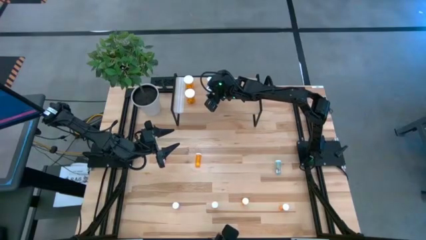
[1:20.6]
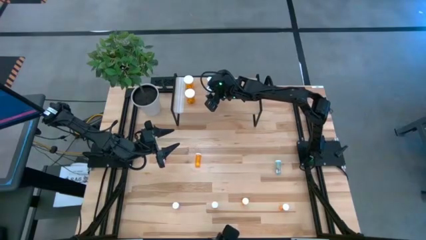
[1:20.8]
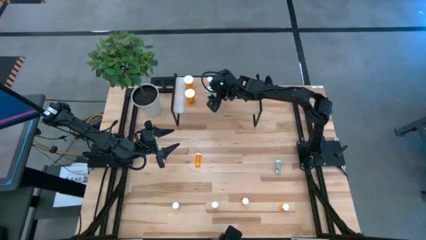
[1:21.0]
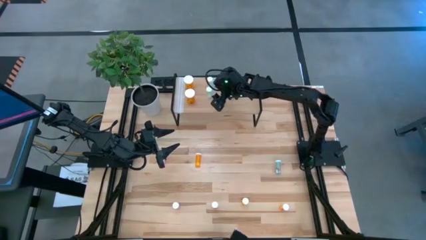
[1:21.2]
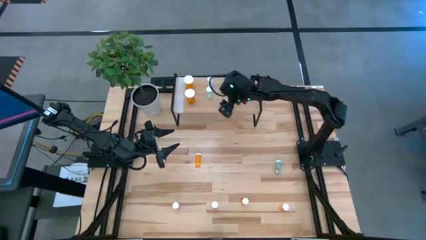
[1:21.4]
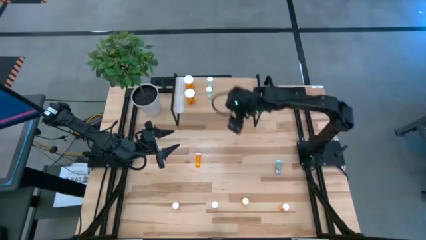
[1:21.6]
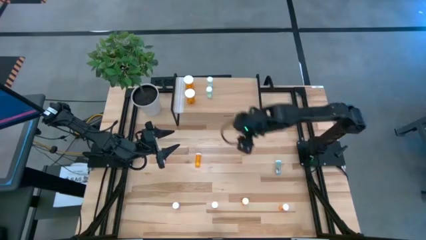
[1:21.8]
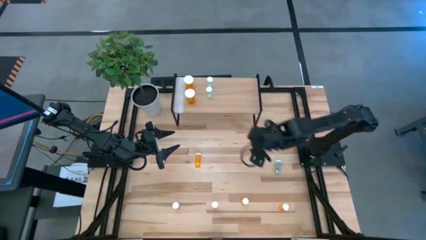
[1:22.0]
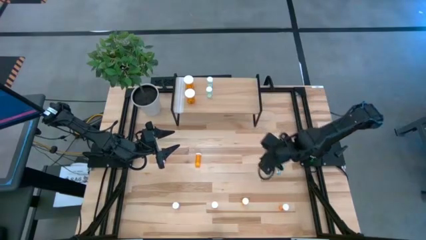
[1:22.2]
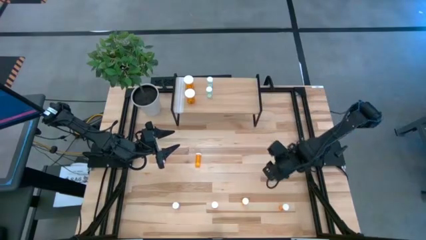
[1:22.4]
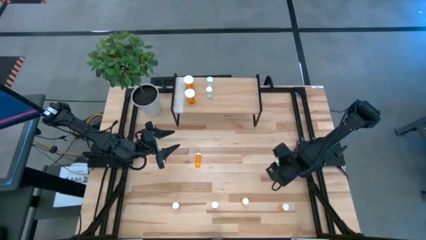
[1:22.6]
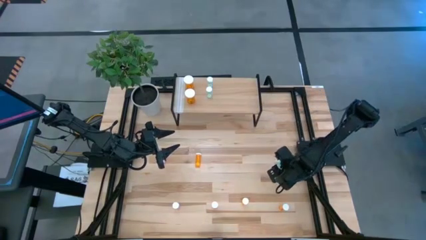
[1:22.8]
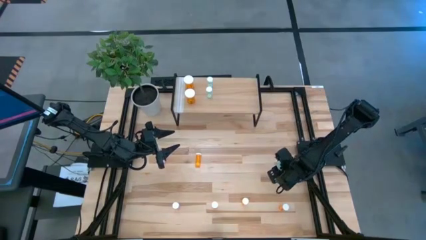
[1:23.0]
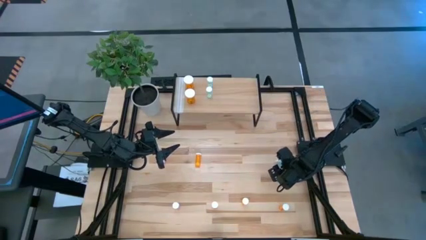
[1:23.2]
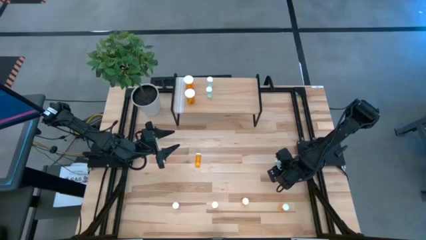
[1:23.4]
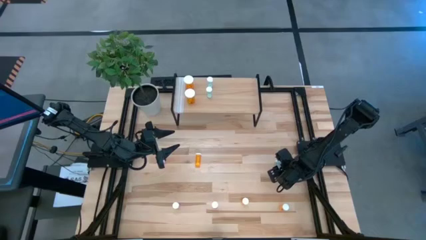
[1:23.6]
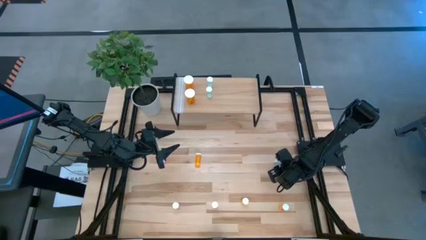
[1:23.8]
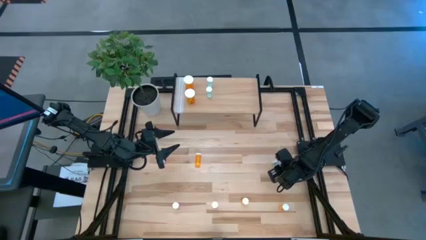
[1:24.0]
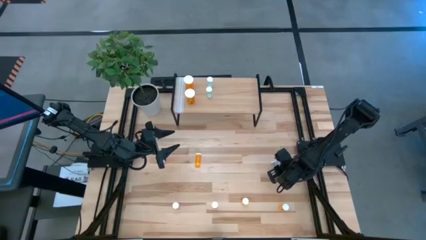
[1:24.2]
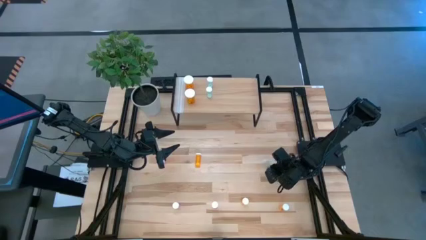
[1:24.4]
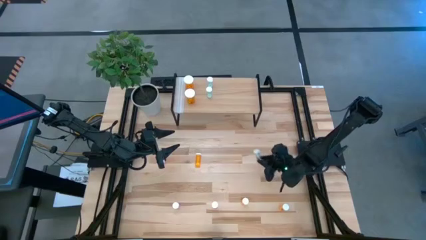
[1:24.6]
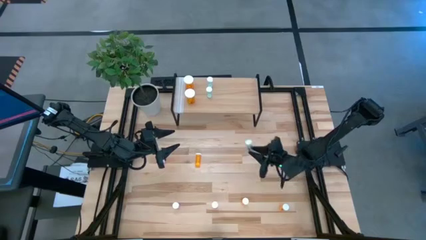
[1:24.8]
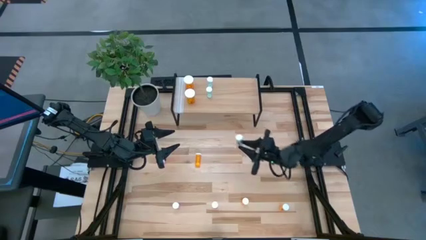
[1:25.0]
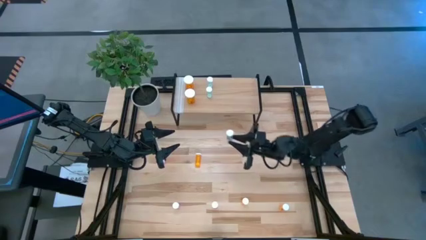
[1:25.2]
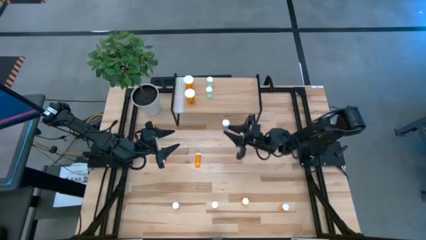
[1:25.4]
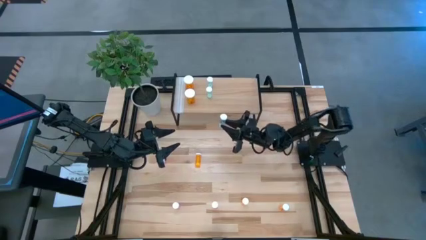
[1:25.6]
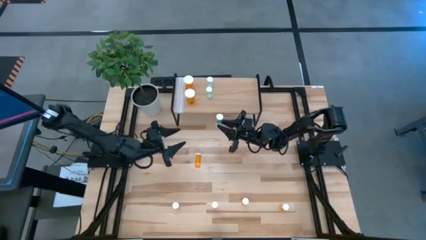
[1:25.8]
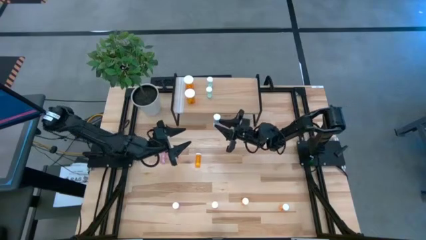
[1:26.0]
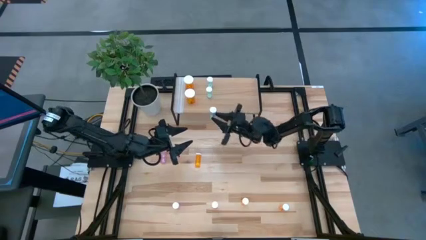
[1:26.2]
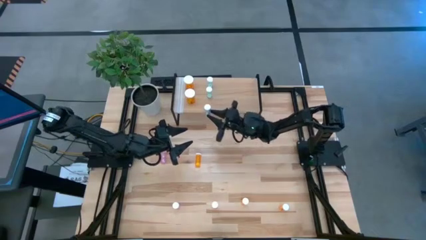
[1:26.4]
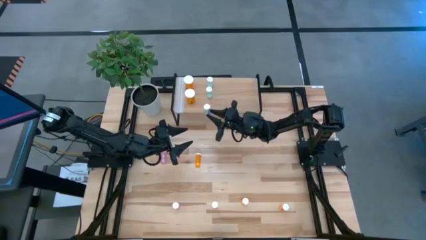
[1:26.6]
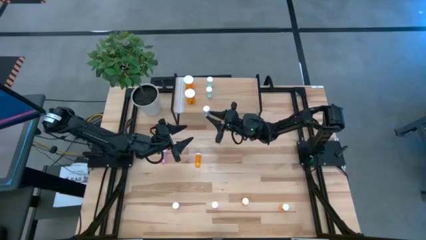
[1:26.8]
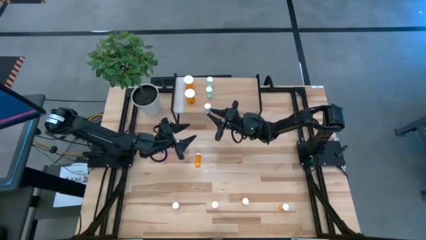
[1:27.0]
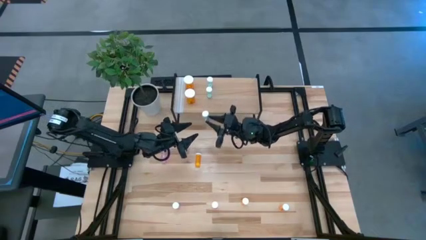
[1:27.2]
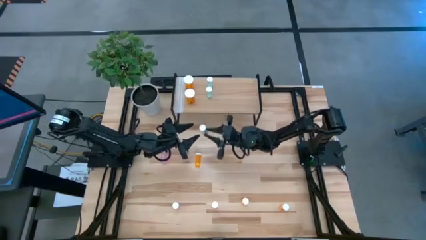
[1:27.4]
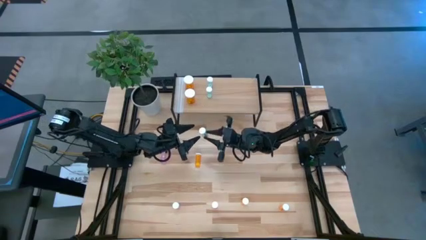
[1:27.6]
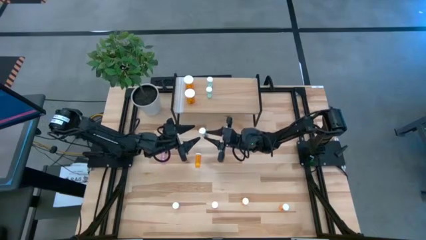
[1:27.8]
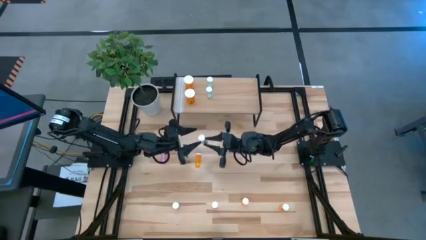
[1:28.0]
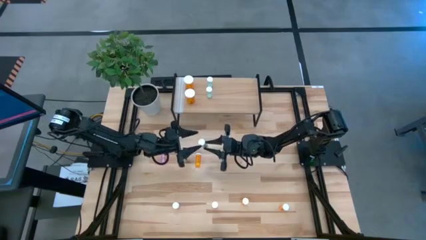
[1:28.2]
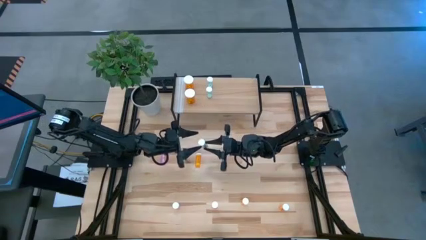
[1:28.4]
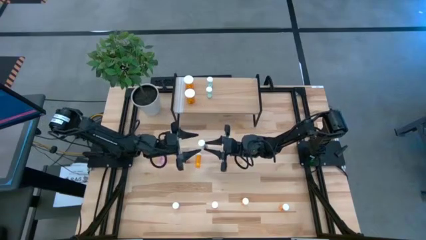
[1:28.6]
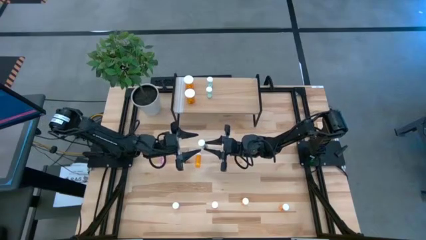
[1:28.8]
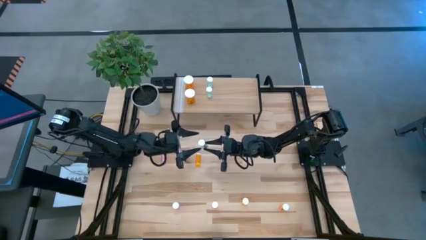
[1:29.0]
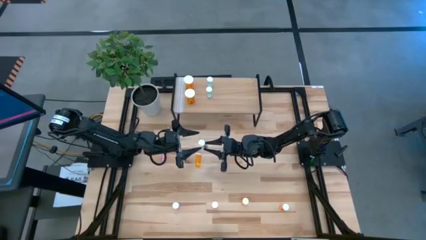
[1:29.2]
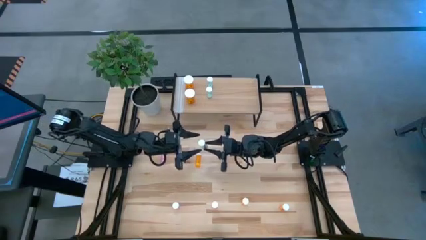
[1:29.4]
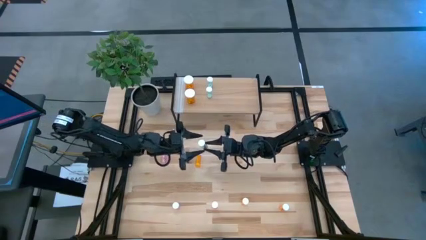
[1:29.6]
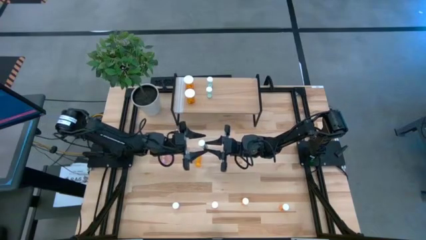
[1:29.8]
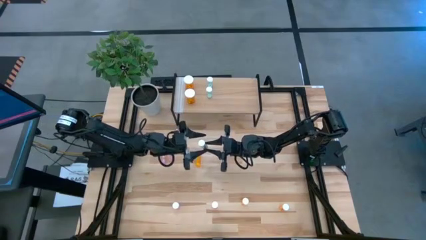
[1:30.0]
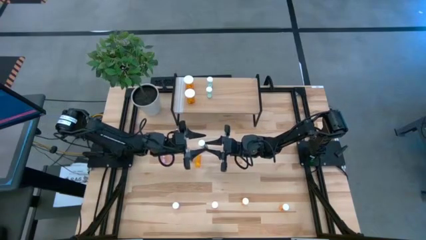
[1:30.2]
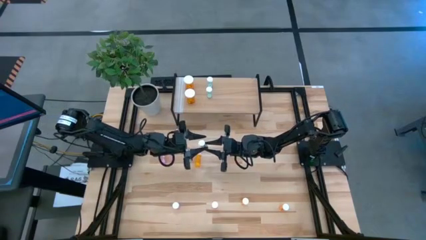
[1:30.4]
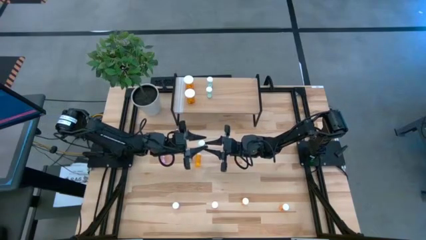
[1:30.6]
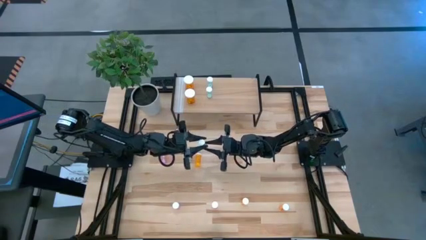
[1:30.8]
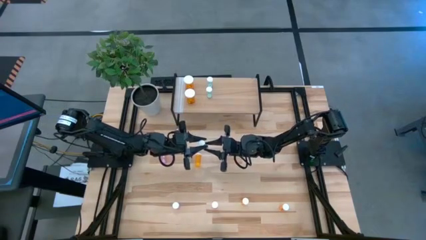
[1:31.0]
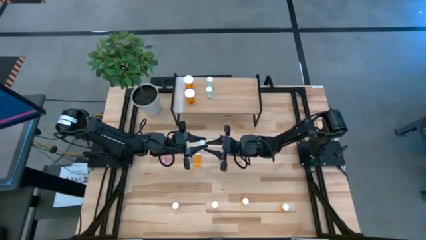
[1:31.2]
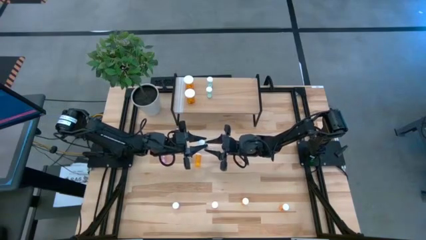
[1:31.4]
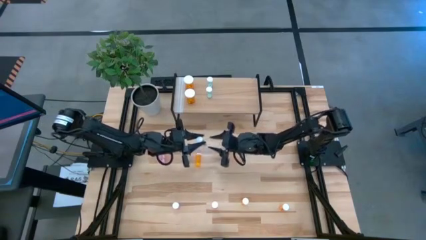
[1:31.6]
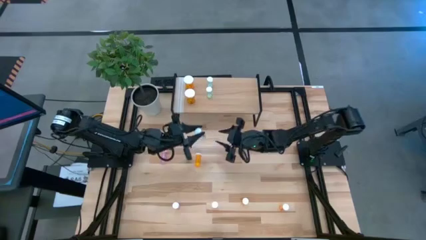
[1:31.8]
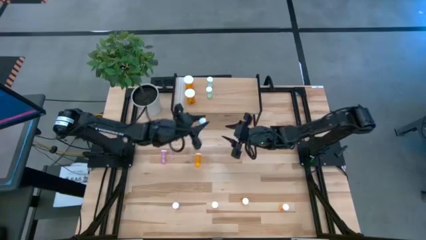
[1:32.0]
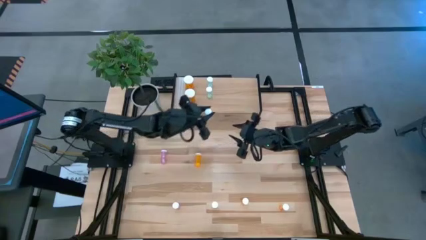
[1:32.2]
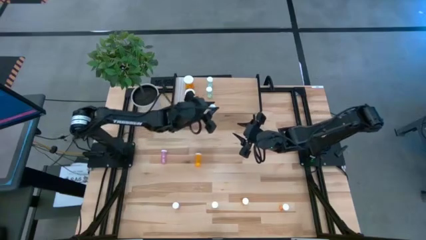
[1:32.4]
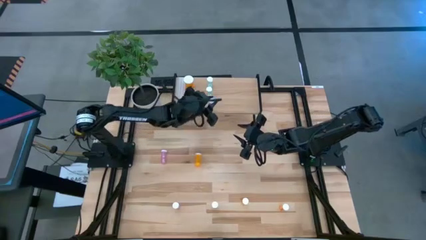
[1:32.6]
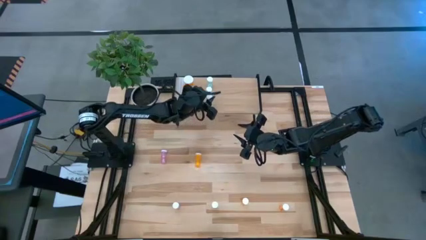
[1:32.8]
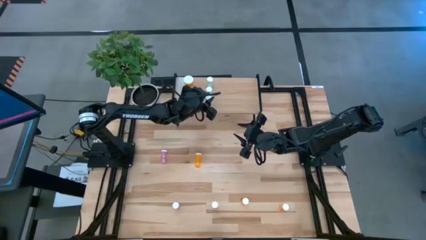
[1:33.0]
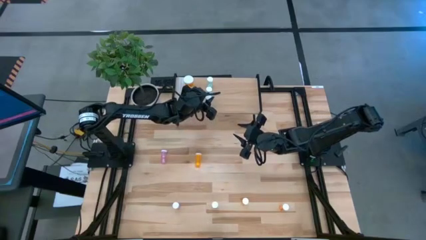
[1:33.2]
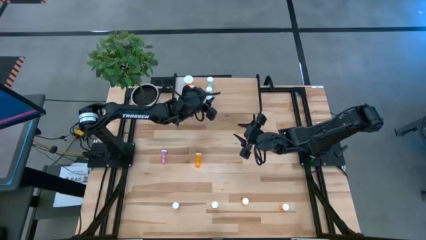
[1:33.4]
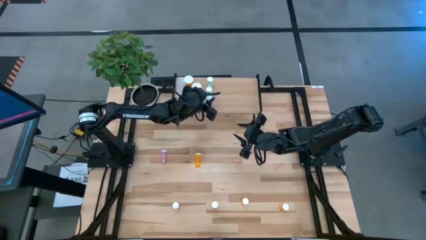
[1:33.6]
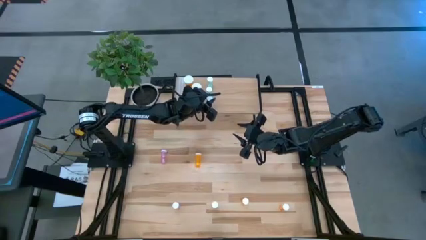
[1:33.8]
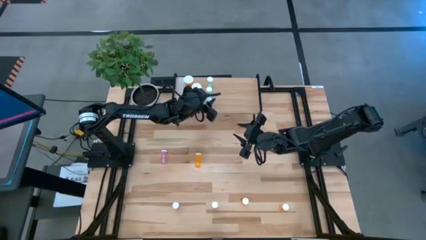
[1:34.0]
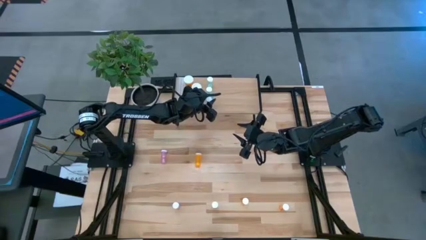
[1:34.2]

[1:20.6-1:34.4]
Task: Pick and place medicine bottles onto shelf by color
Put the green pill bottle on the shelf aligned with the other green pill bottles
